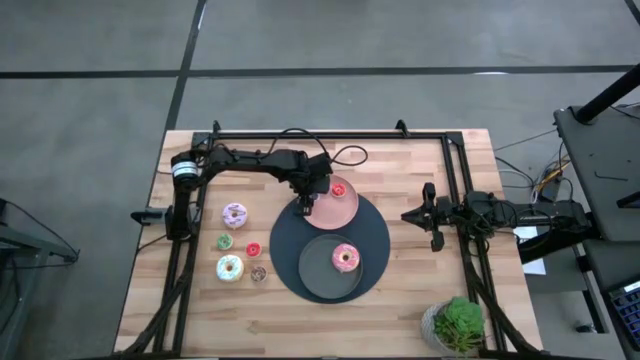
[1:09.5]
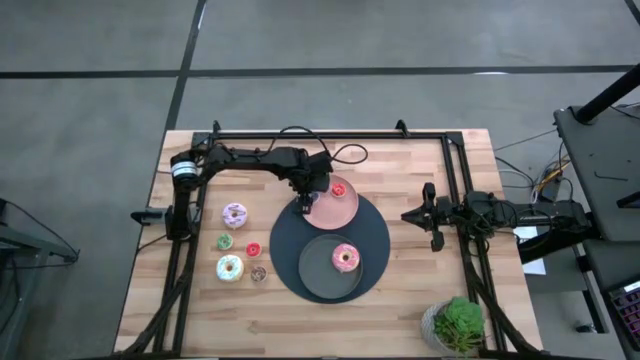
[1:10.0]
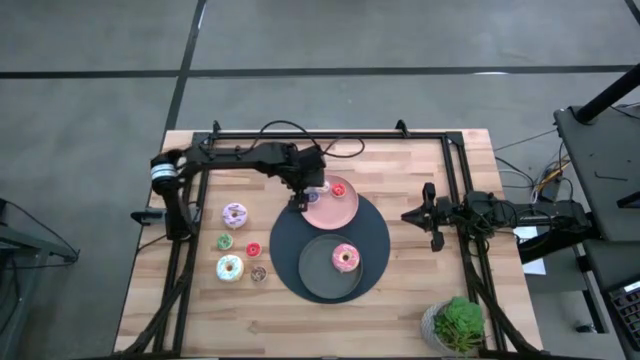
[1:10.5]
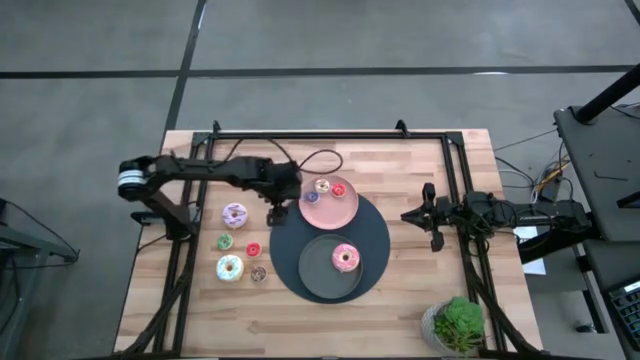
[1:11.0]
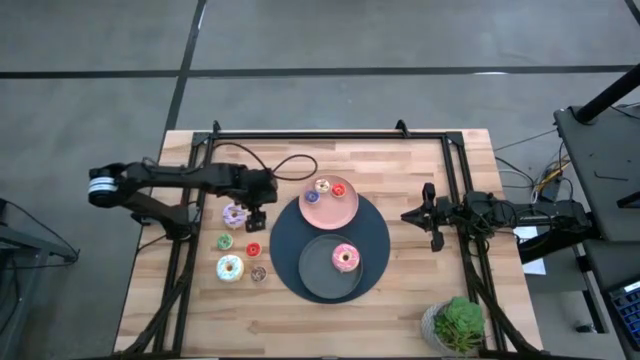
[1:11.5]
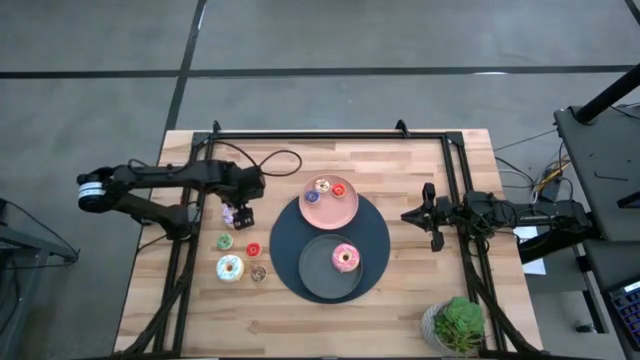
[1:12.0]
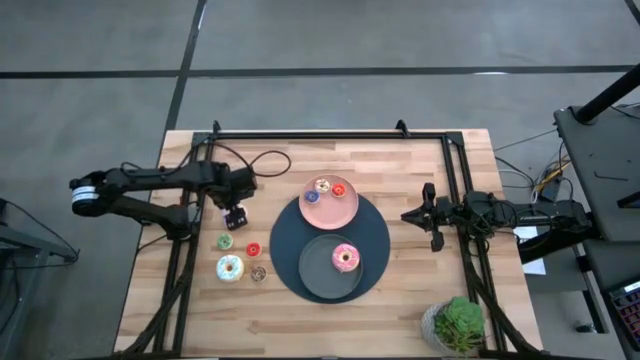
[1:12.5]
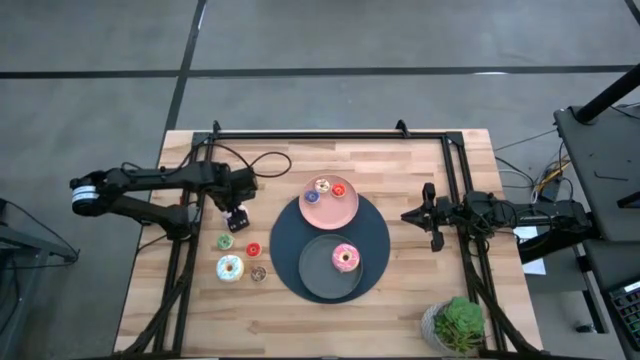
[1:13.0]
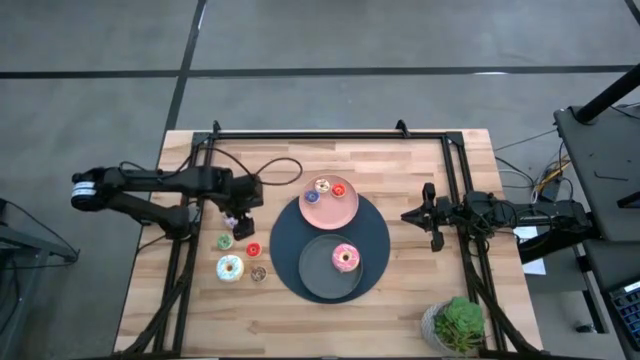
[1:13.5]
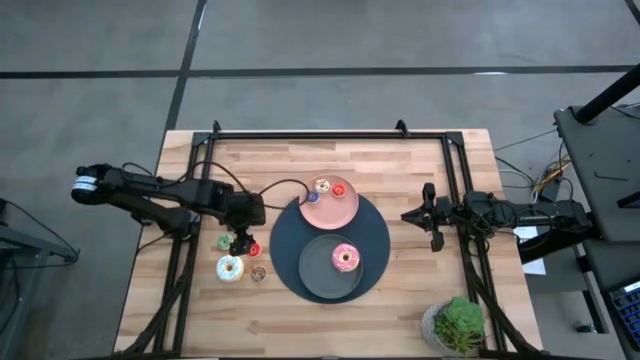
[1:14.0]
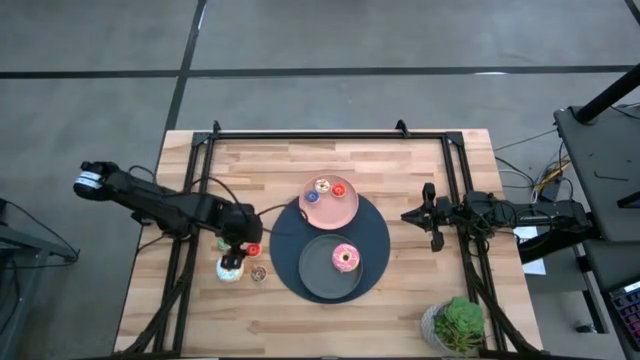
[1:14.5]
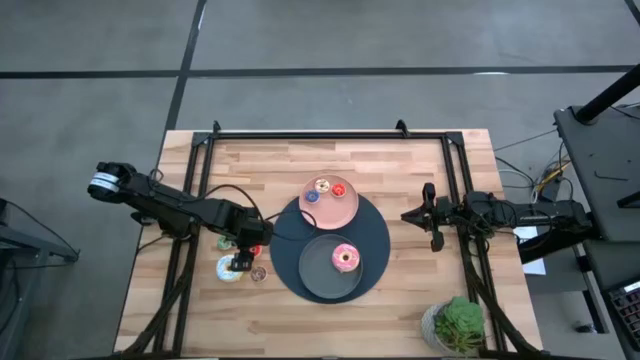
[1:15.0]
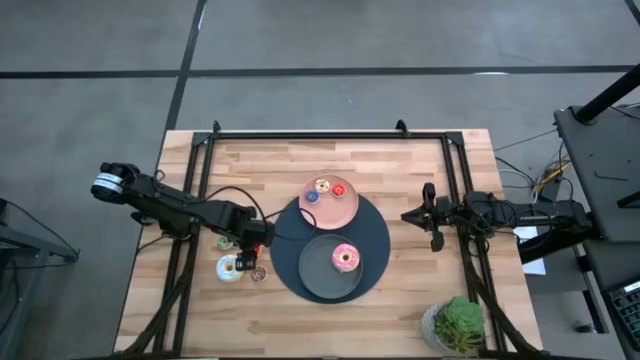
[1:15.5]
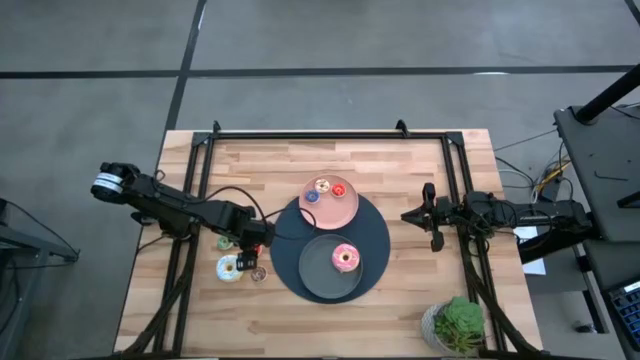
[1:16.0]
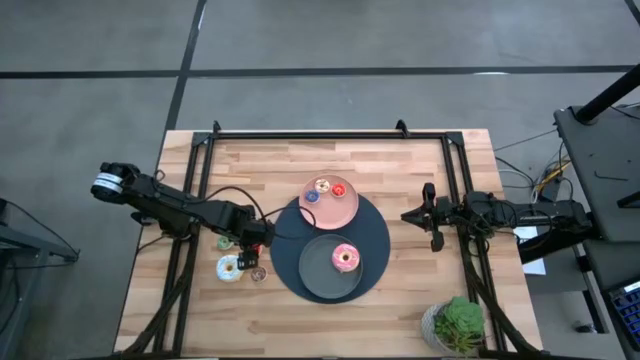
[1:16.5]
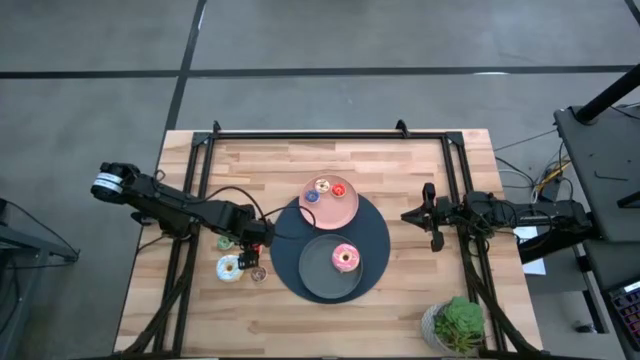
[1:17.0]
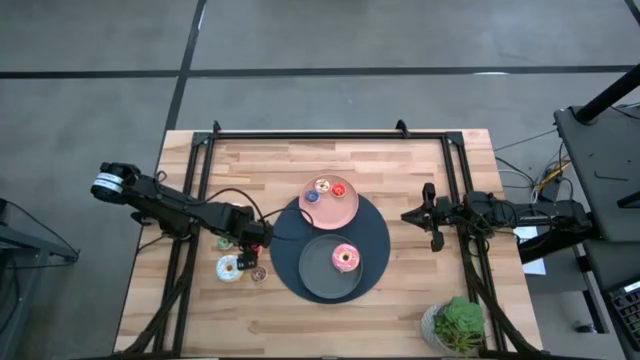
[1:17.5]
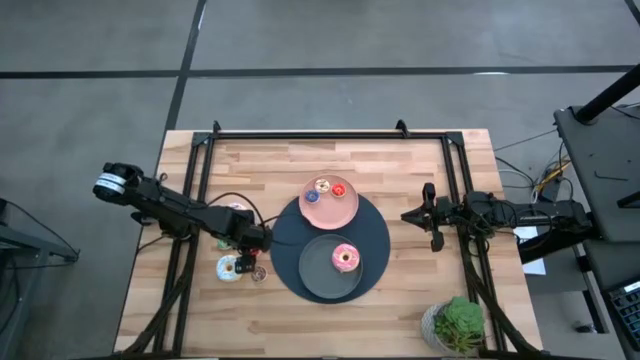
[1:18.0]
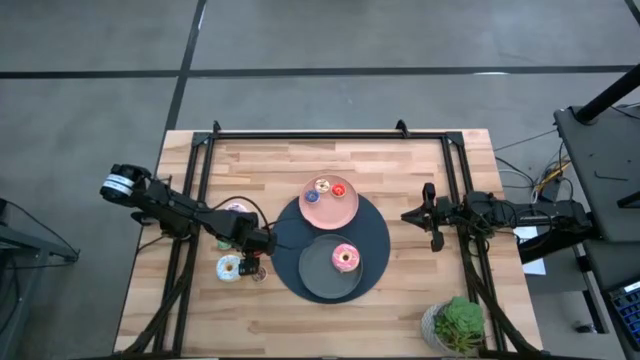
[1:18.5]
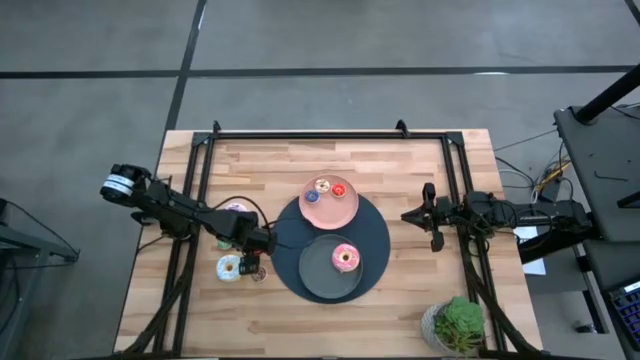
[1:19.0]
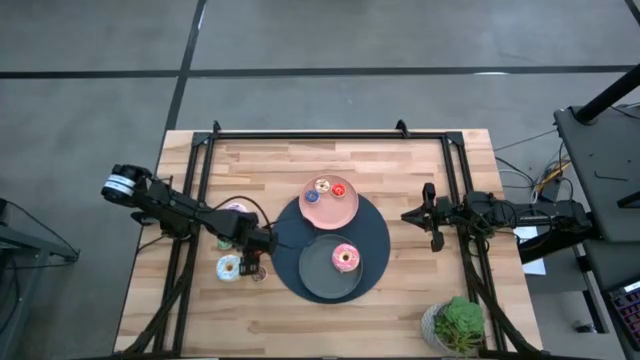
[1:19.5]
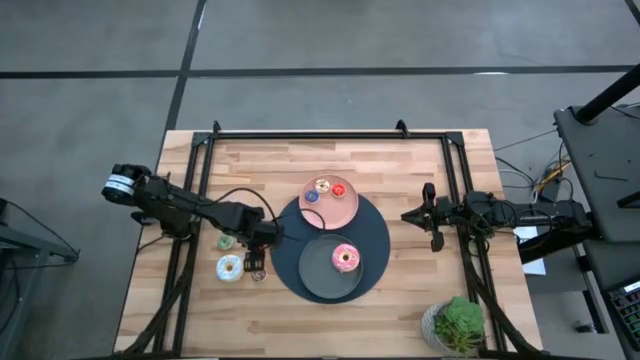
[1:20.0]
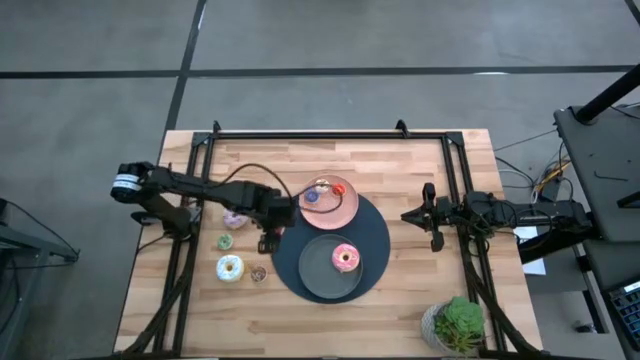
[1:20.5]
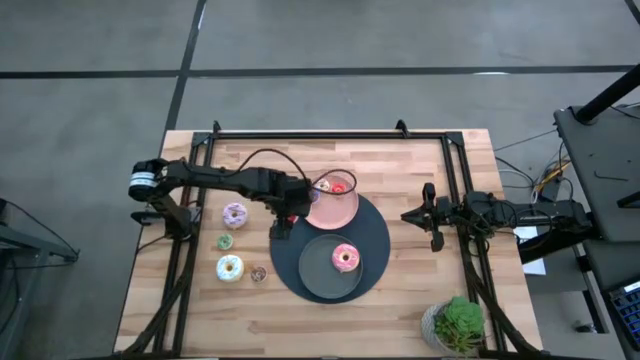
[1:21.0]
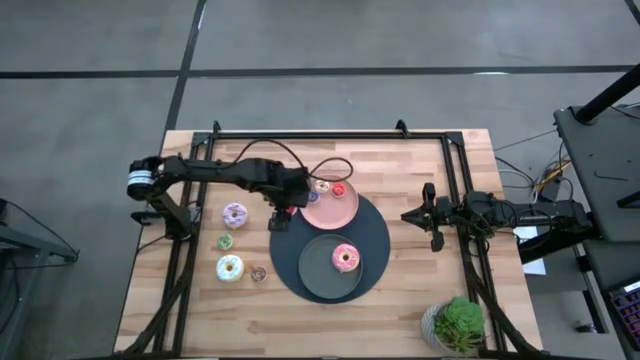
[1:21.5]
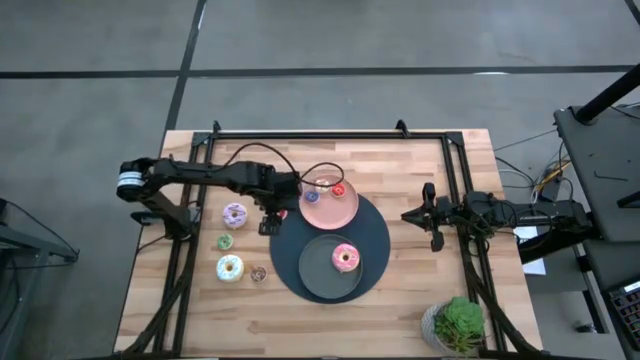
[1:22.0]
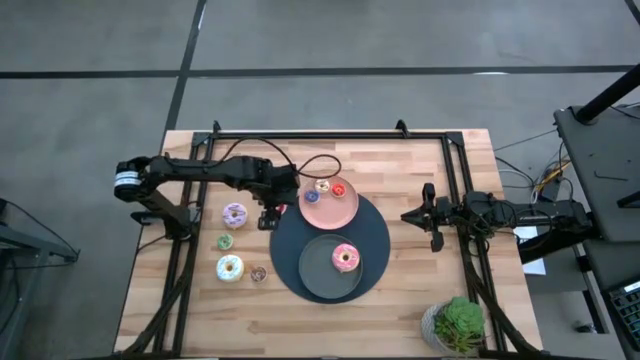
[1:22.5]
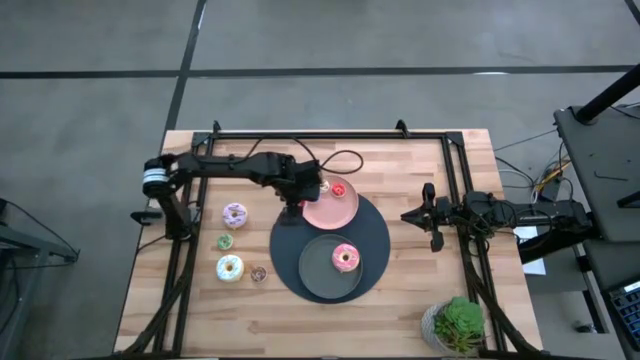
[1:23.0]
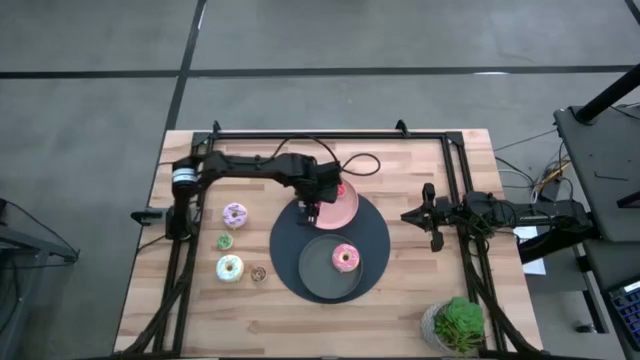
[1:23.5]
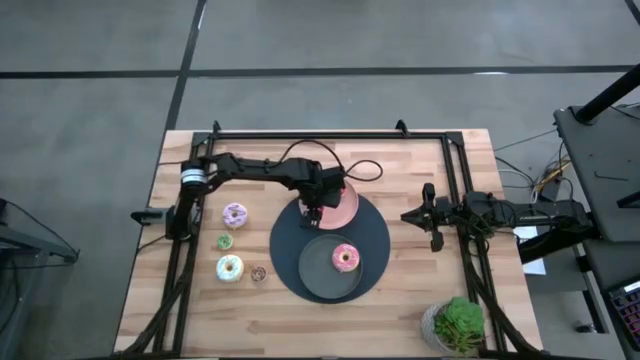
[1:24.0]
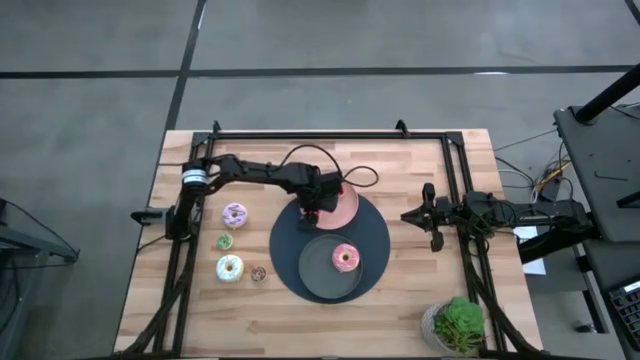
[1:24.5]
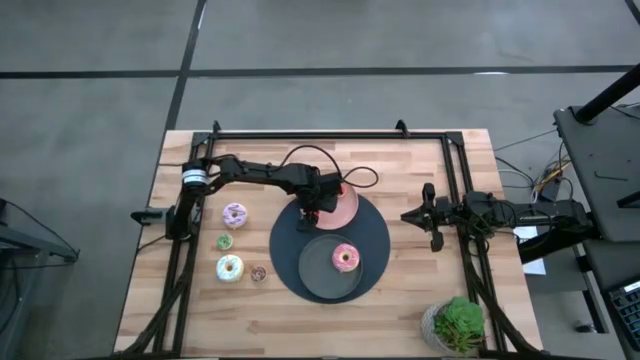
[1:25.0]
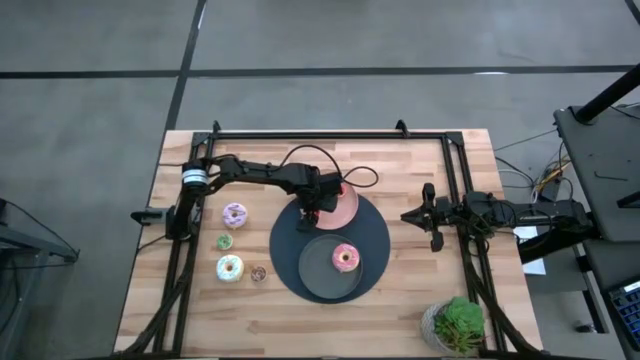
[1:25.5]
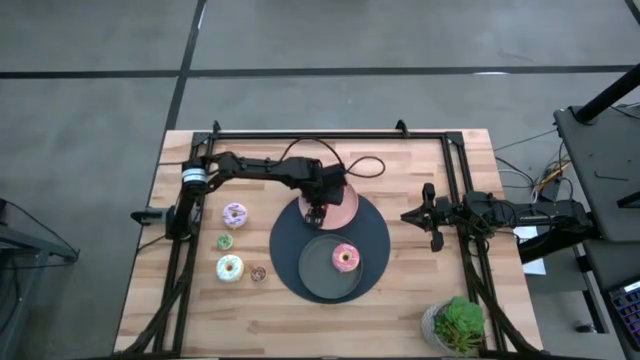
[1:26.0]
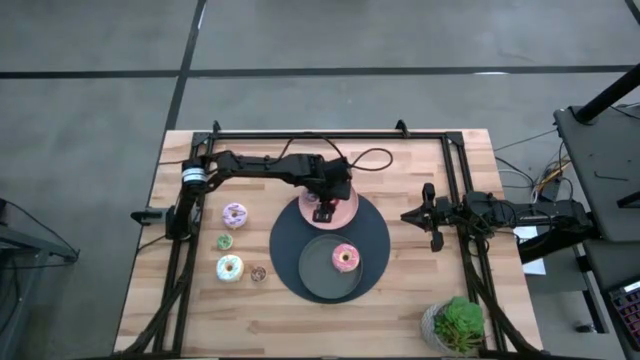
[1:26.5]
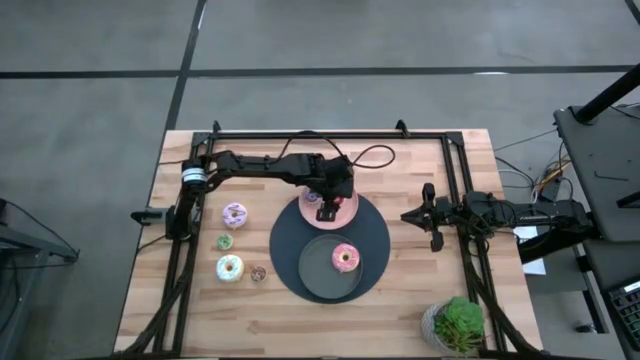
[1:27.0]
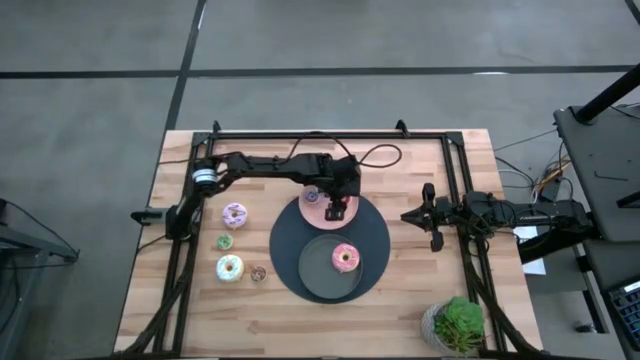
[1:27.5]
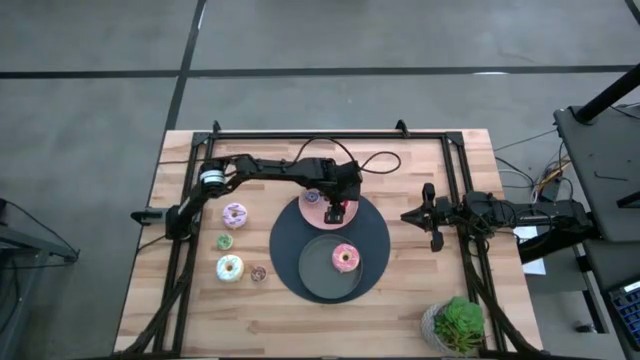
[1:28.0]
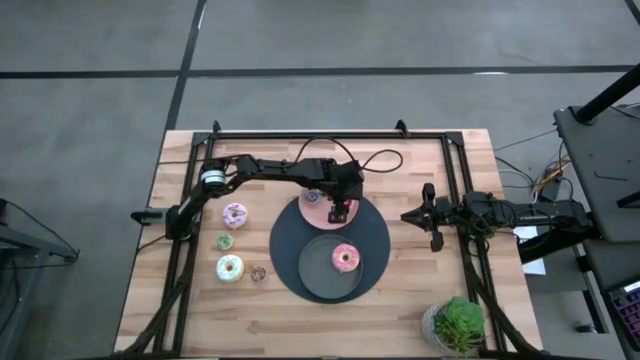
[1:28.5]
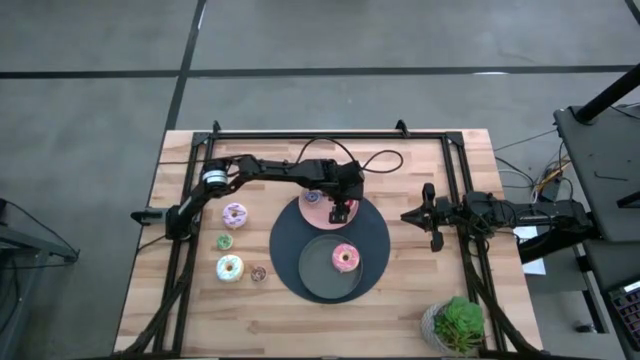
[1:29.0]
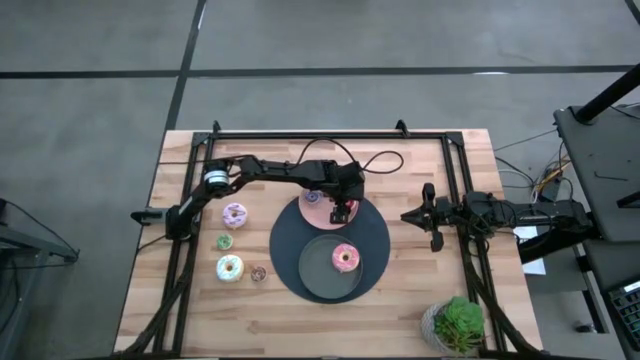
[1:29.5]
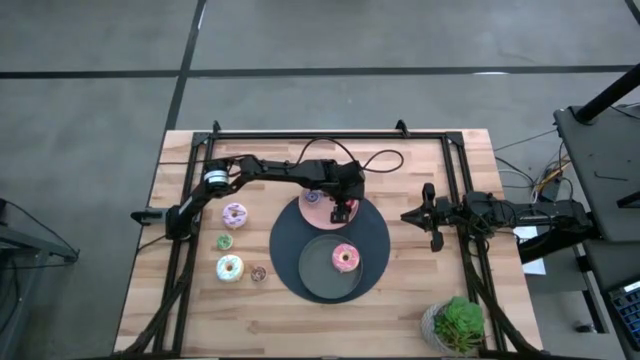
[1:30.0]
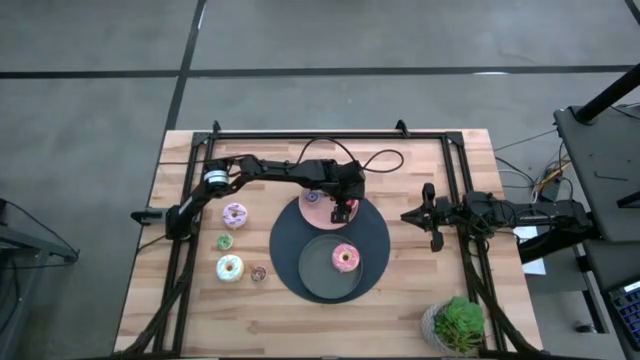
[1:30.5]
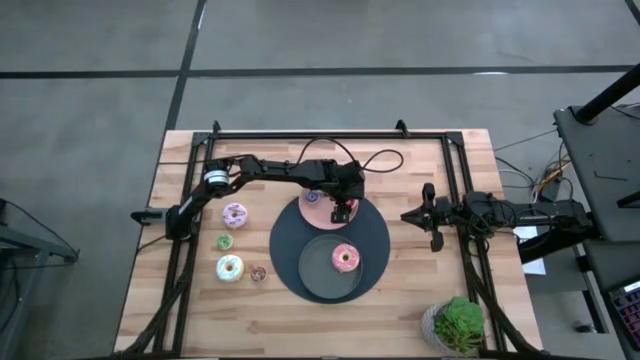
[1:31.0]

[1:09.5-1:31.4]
Task: Pick & Place donuts
Put the small orange donut on the pink plate
